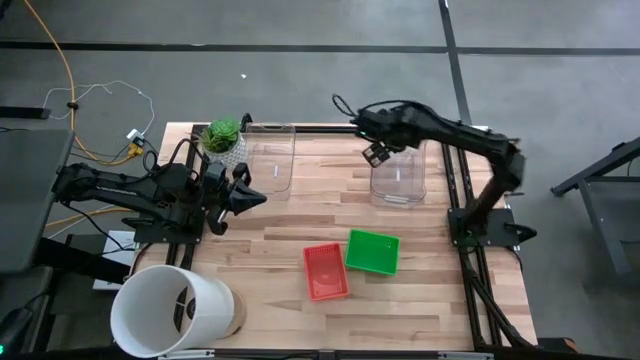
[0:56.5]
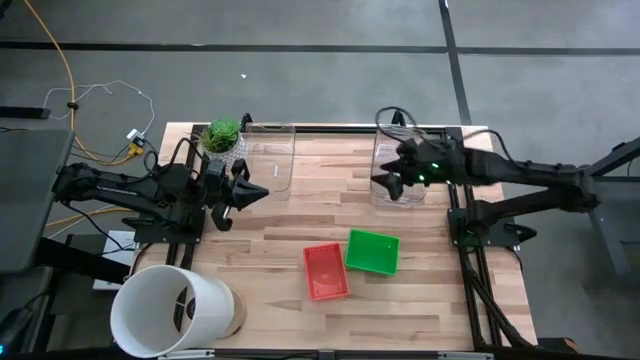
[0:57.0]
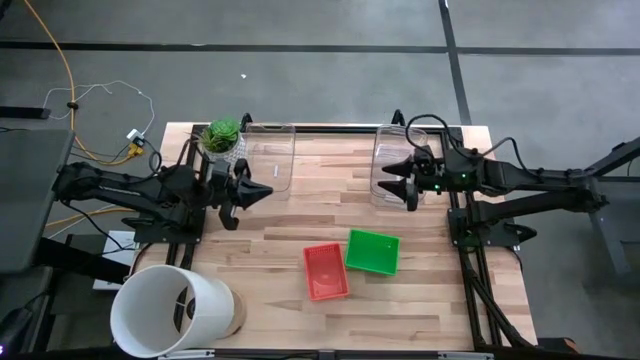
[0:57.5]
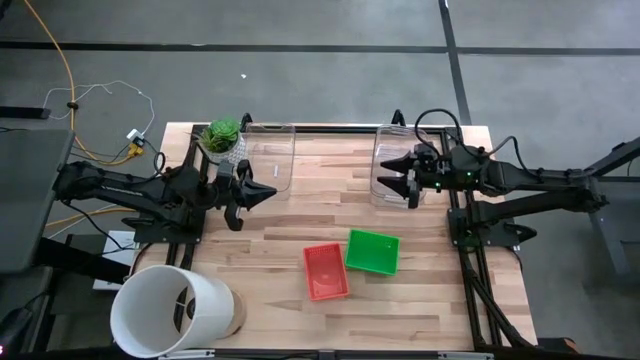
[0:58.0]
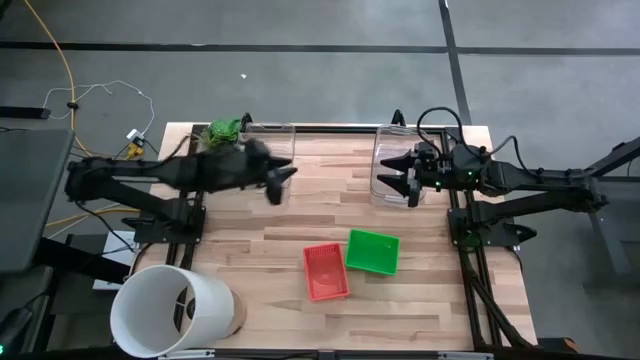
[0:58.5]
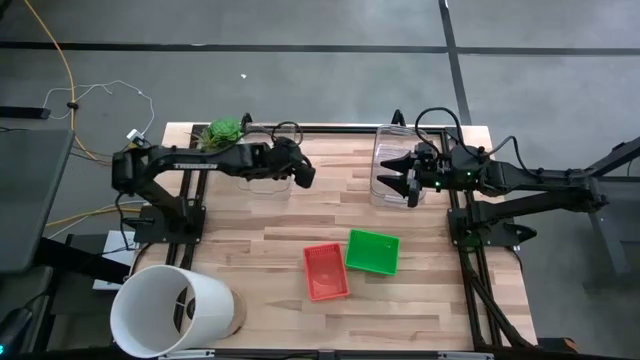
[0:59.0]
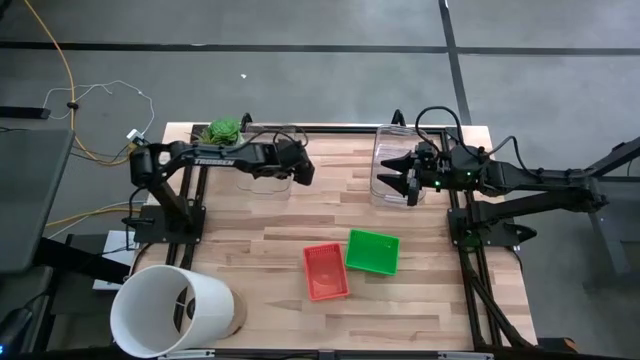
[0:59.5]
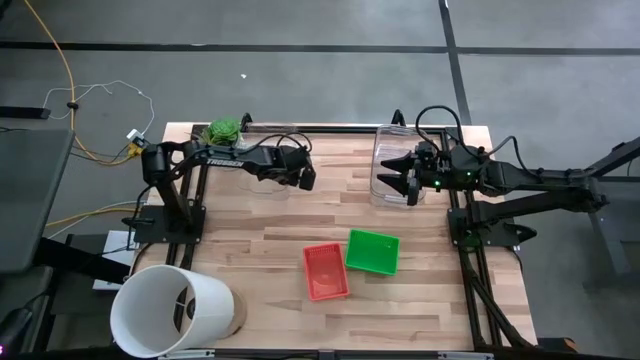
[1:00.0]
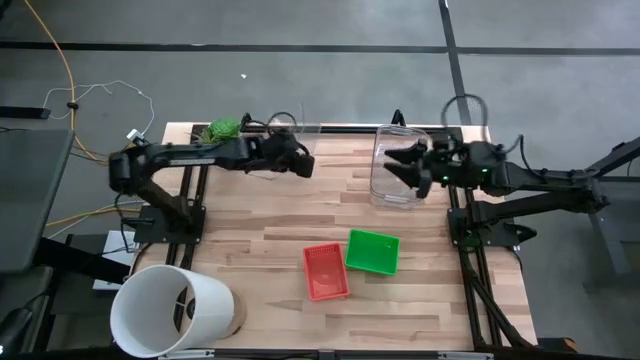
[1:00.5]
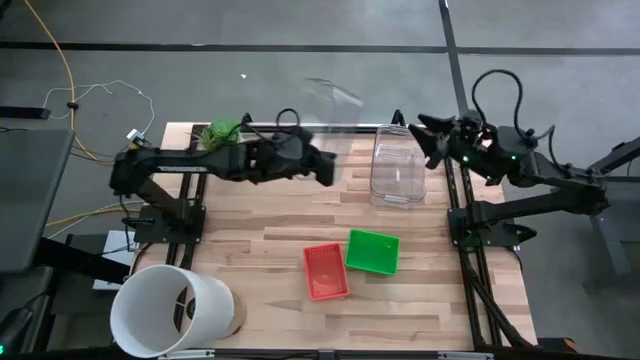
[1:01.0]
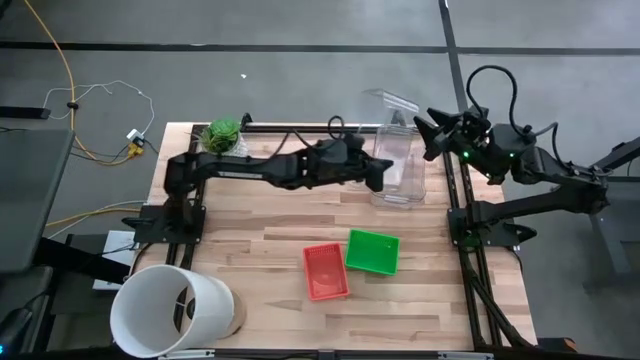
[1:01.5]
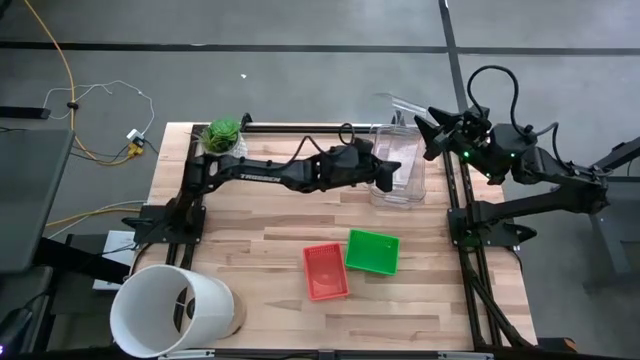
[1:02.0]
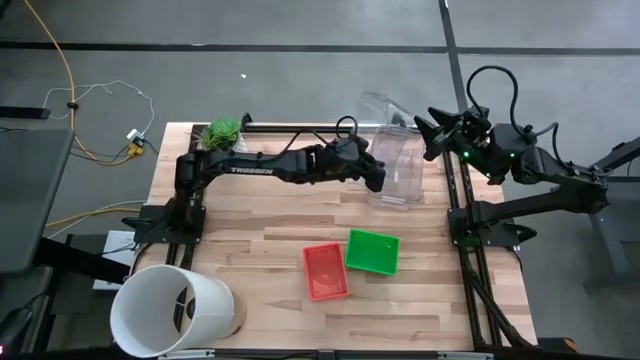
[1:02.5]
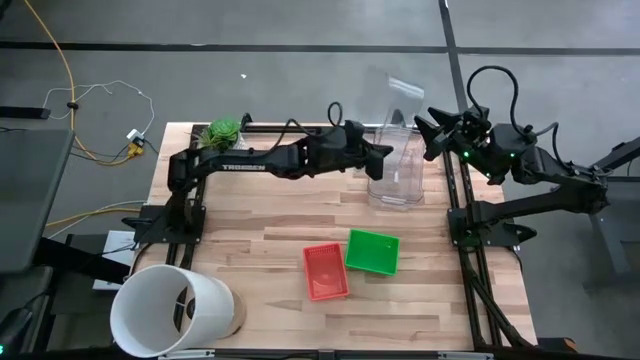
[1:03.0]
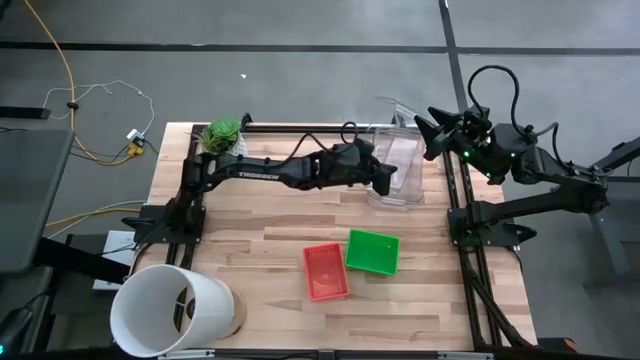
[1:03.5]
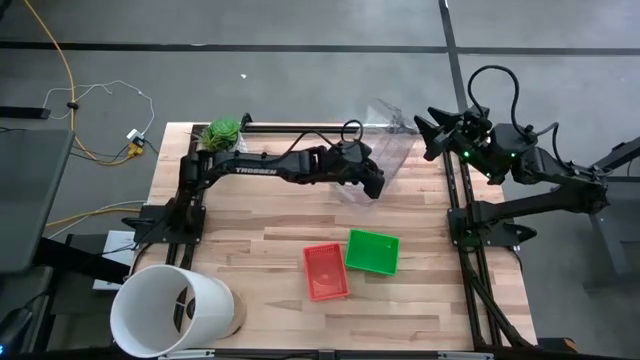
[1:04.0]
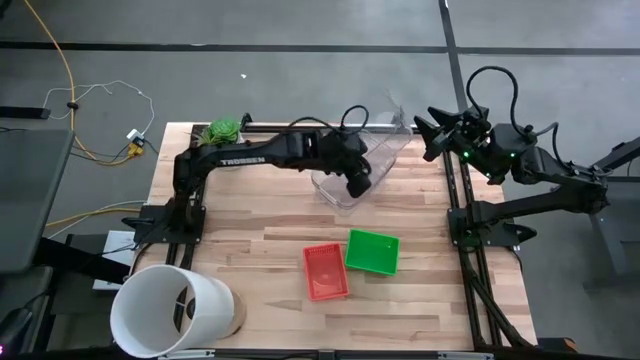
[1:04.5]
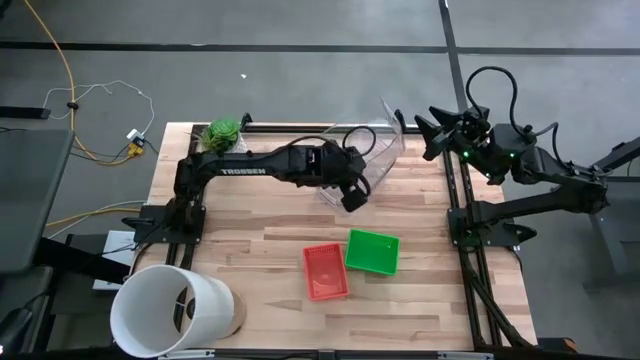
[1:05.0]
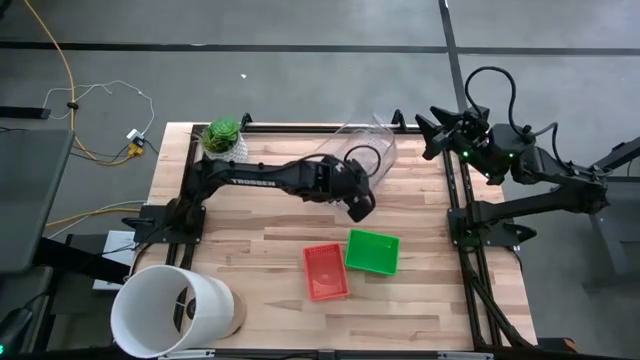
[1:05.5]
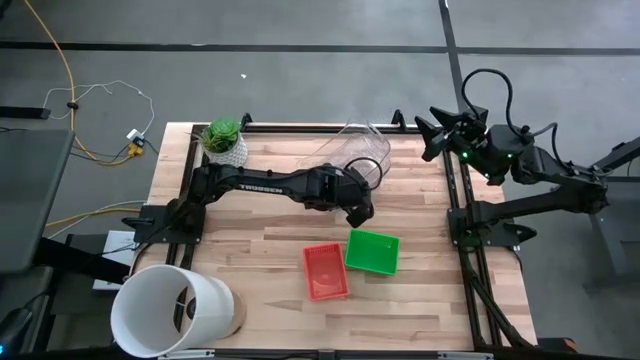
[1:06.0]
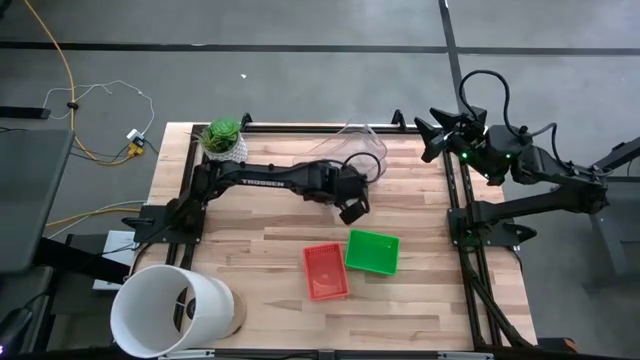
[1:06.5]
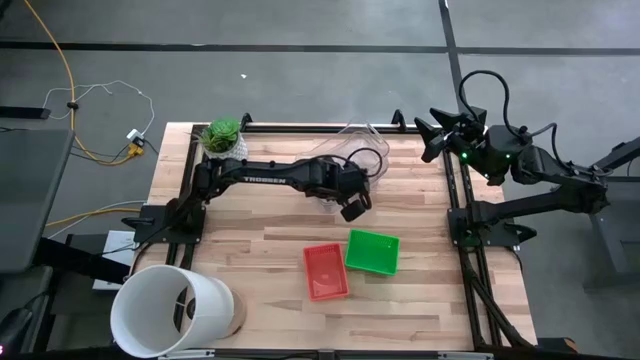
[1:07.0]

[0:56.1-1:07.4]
Stack the left transparent bin on the top right stacked transparent bins

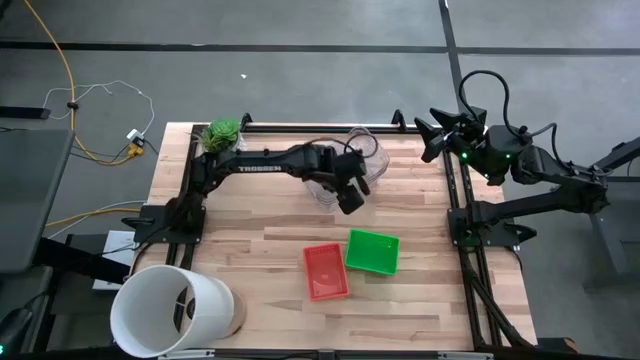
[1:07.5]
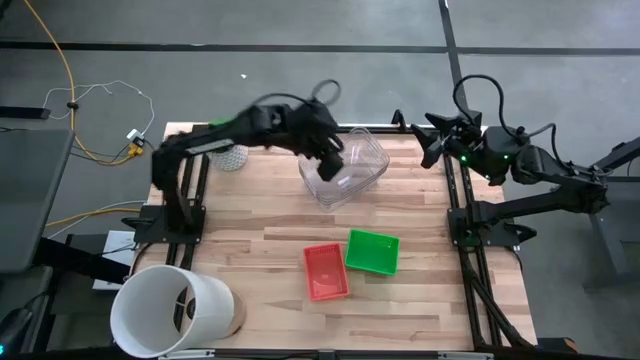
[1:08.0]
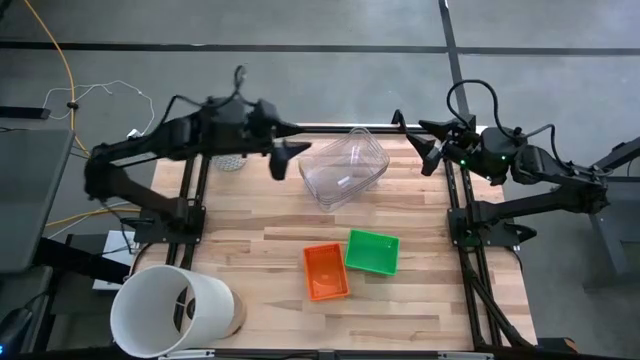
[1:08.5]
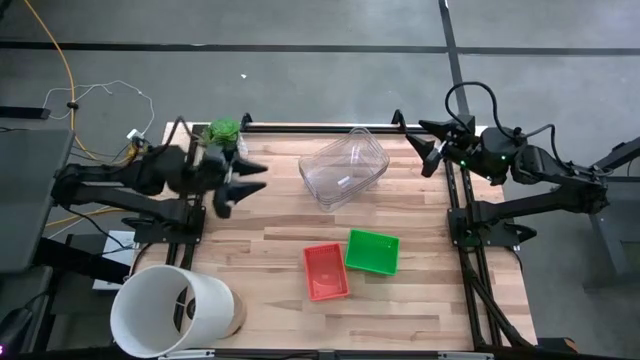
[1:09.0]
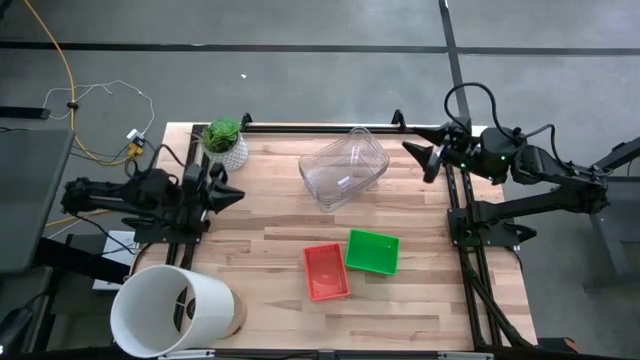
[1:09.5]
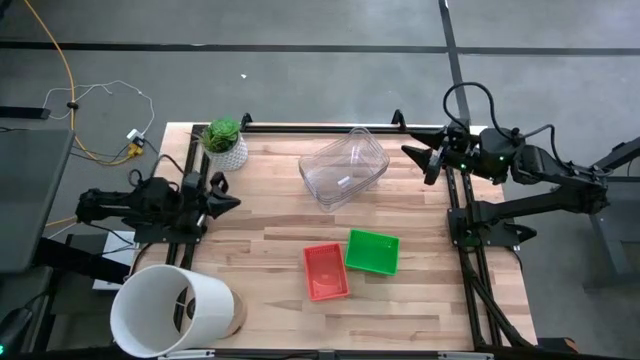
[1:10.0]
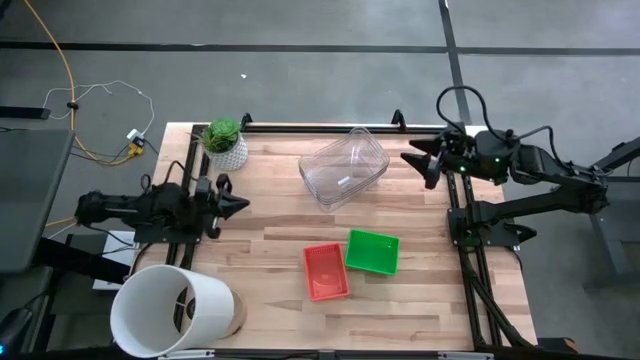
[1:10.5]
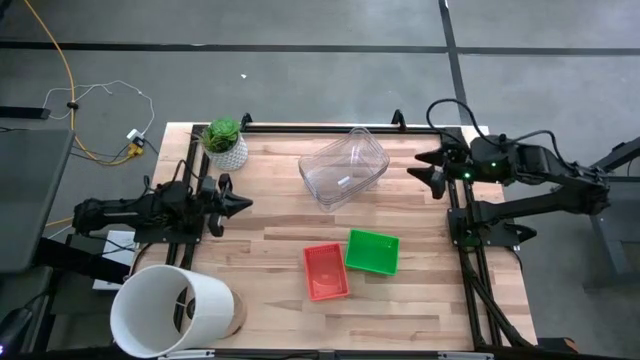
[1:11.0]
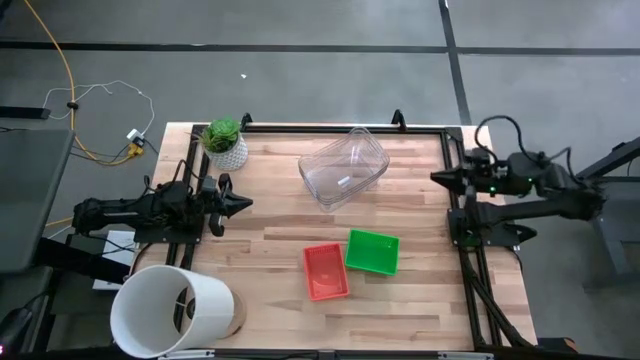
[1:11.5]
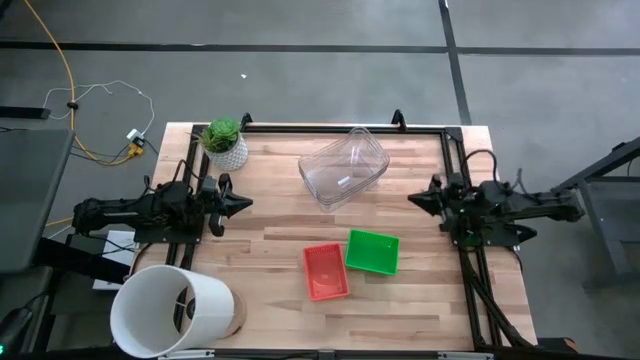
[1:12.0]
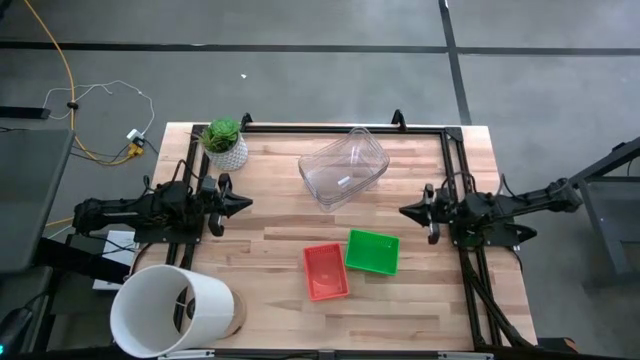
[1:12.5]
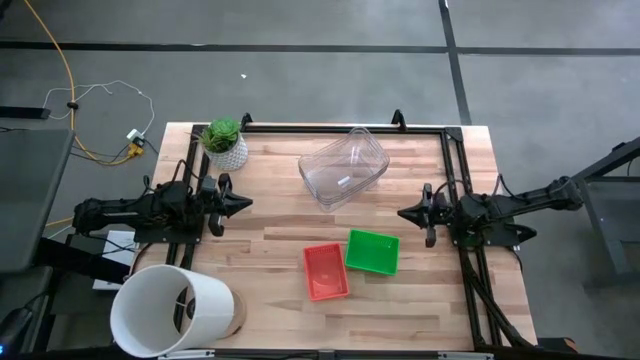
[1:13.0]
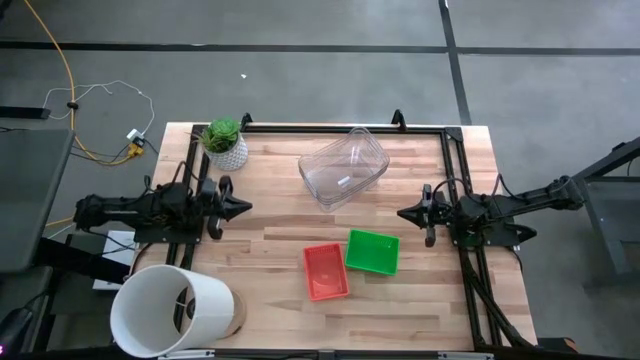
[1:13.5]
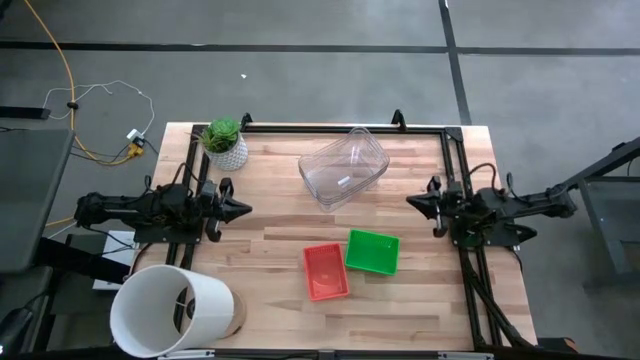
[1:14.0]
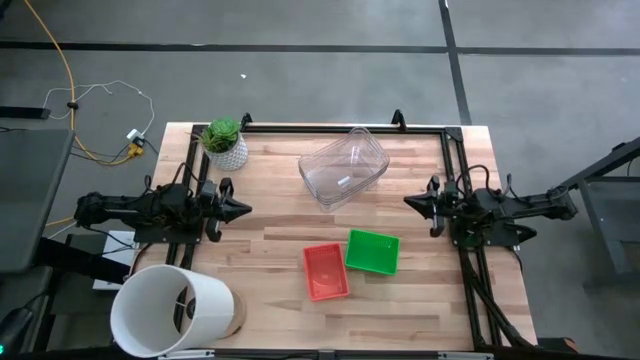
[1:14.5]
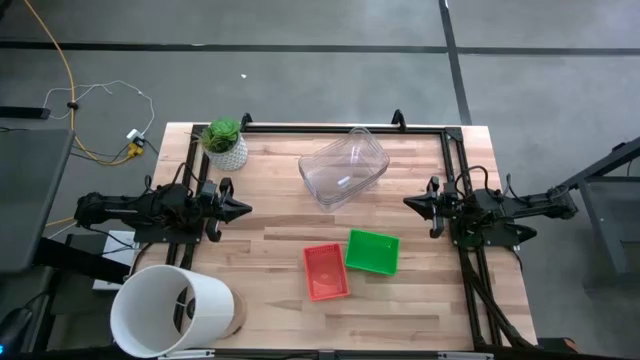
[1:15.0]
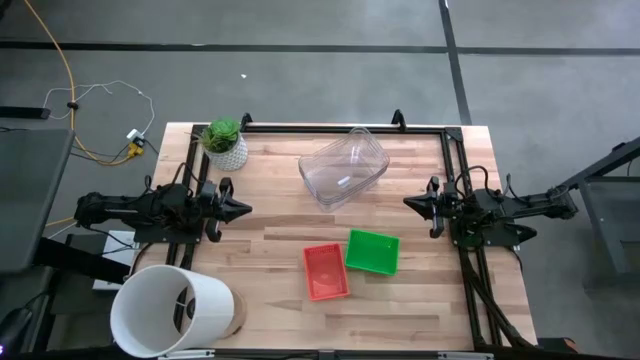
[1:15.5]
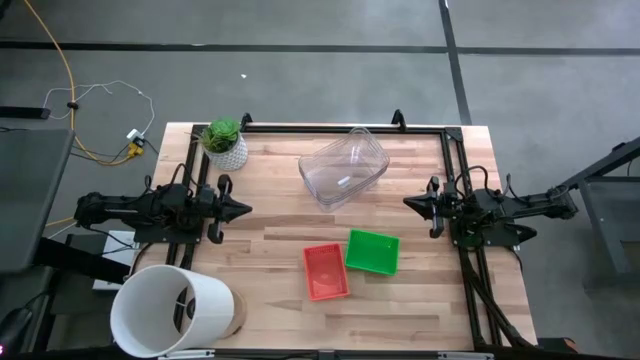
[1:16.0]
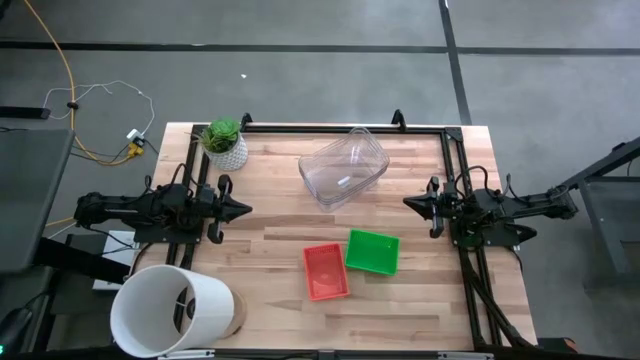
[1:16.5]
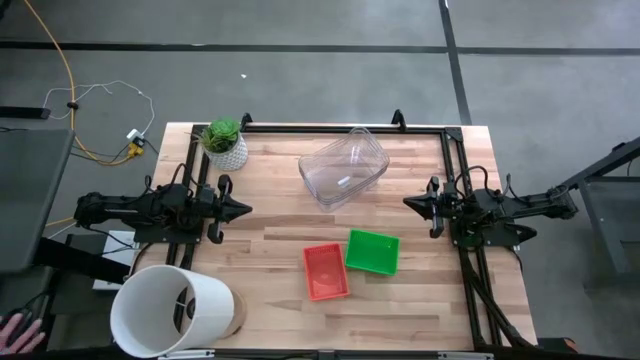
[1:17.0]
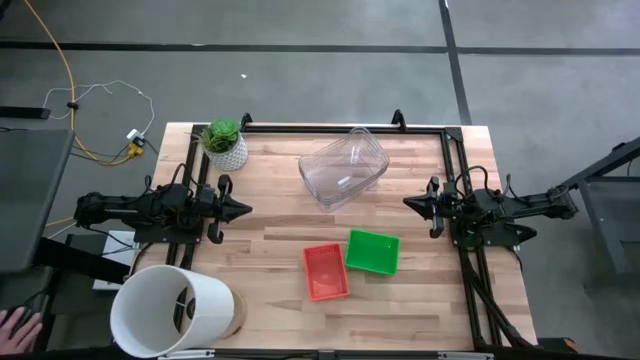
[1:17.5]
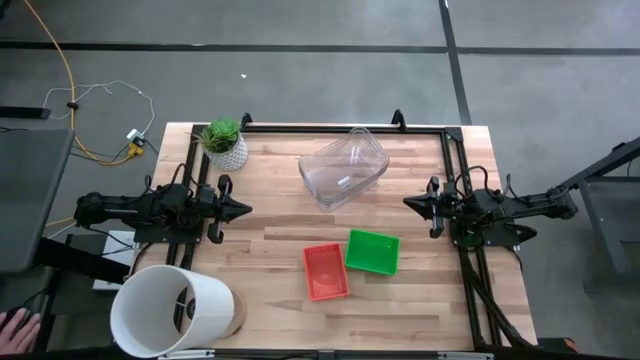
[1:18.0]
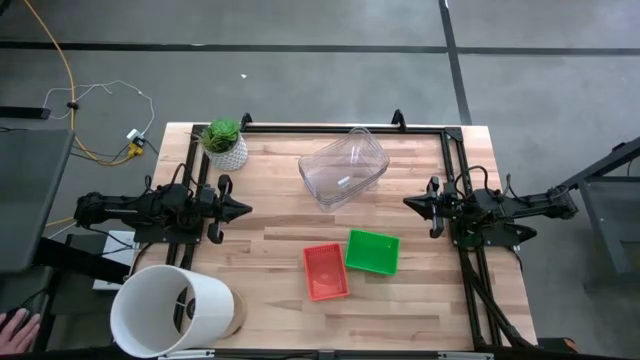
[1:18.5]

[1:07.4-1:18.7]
Return to Home Position
